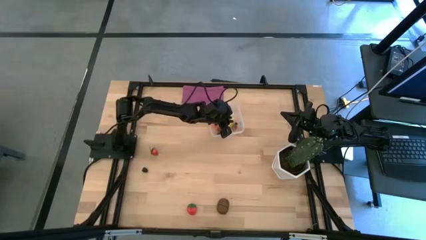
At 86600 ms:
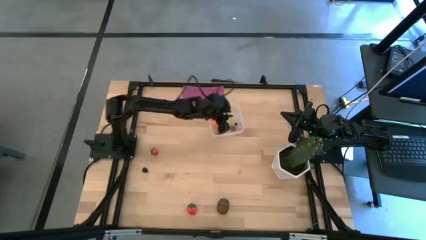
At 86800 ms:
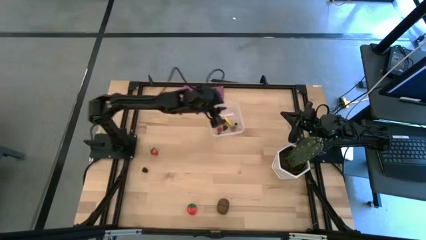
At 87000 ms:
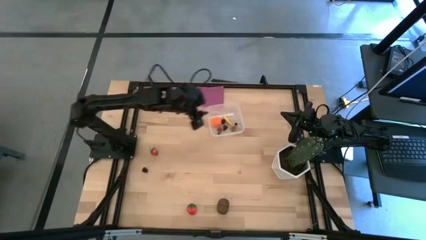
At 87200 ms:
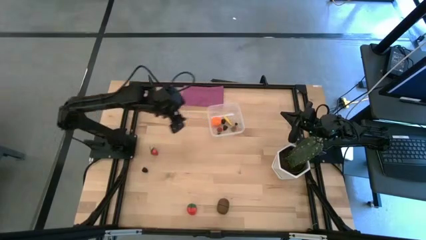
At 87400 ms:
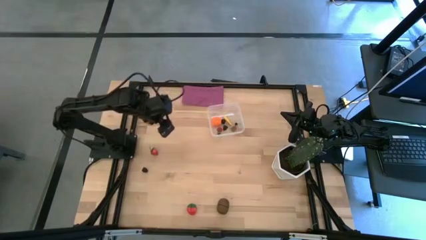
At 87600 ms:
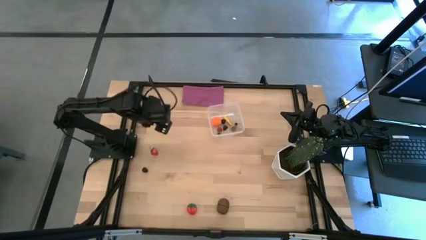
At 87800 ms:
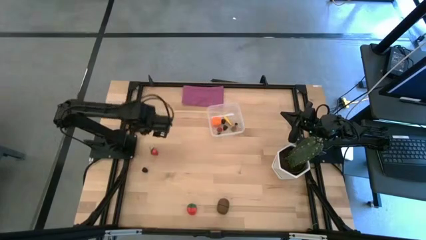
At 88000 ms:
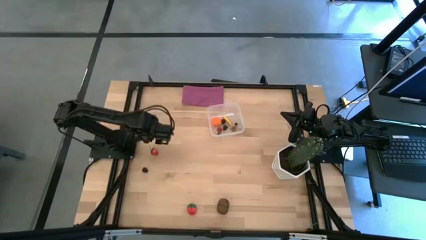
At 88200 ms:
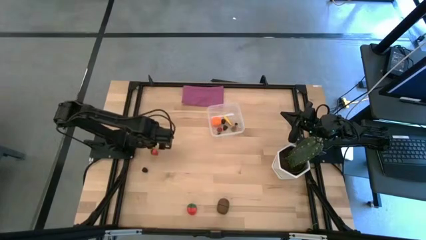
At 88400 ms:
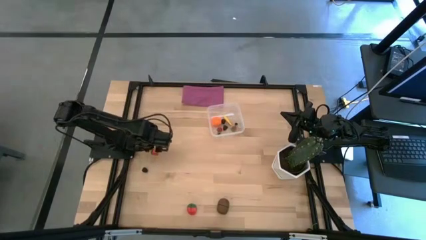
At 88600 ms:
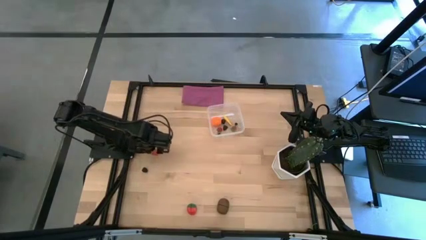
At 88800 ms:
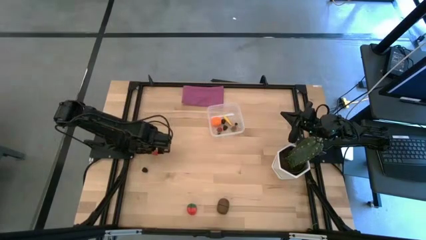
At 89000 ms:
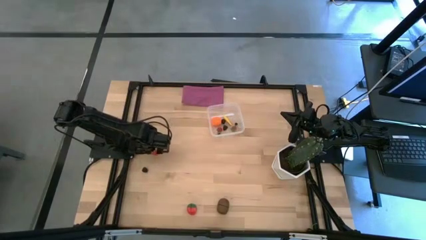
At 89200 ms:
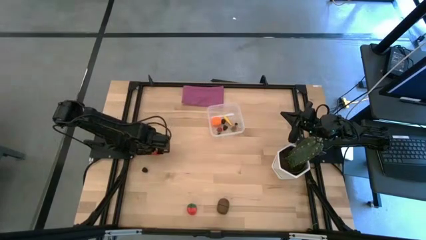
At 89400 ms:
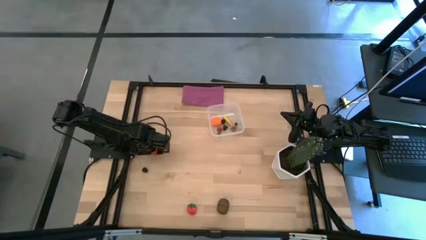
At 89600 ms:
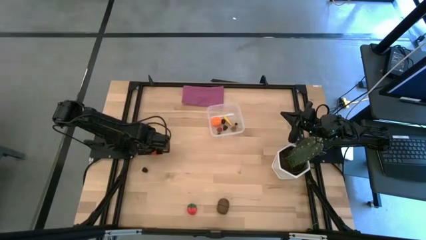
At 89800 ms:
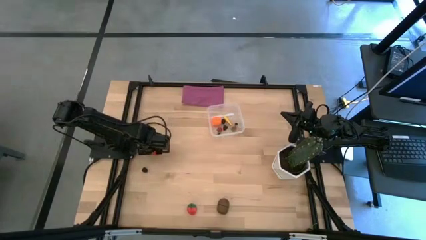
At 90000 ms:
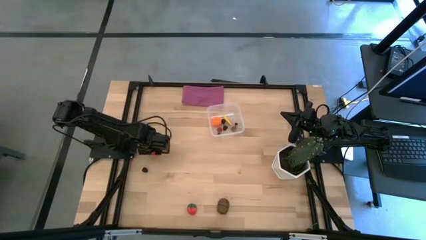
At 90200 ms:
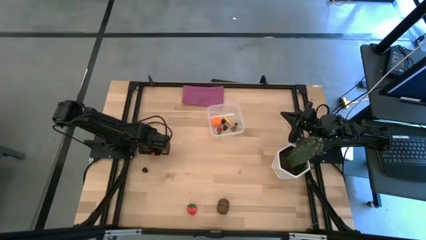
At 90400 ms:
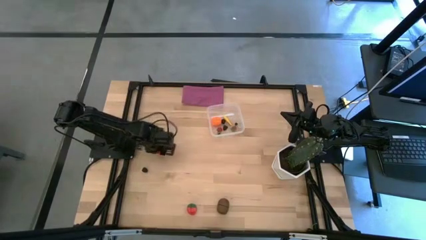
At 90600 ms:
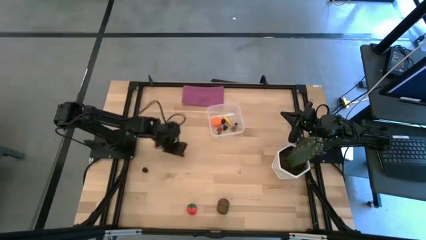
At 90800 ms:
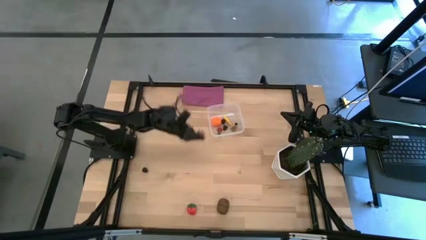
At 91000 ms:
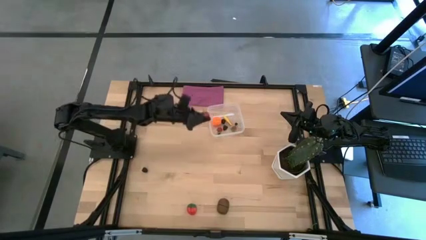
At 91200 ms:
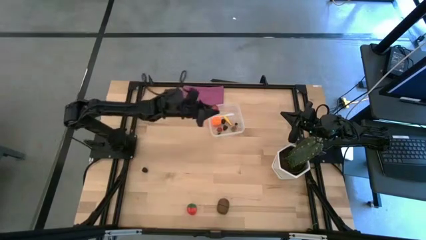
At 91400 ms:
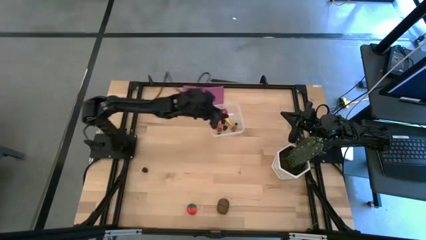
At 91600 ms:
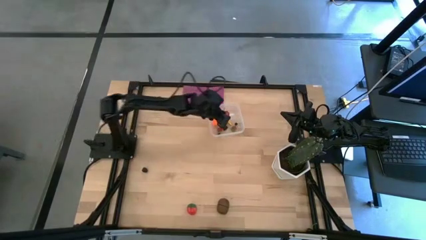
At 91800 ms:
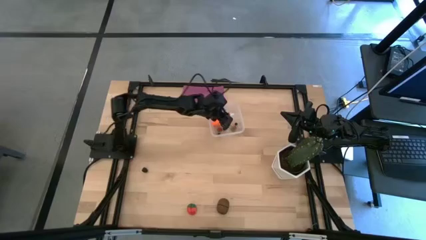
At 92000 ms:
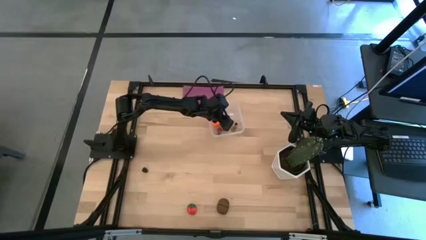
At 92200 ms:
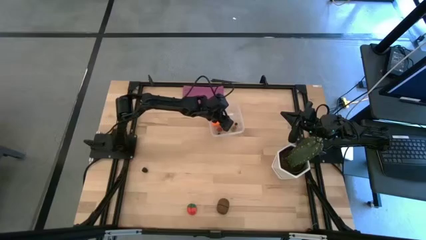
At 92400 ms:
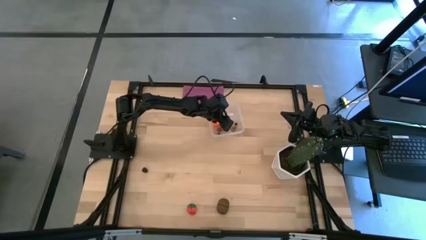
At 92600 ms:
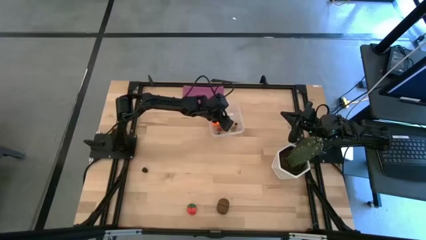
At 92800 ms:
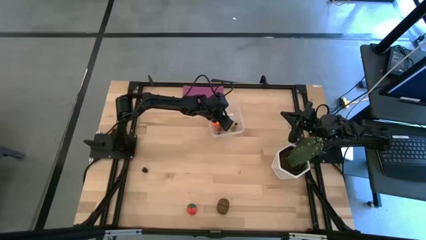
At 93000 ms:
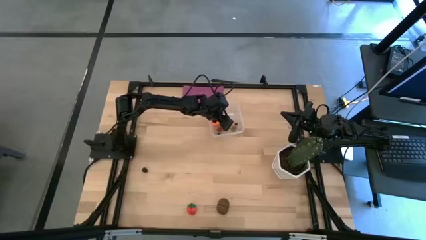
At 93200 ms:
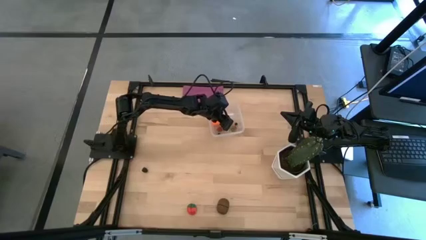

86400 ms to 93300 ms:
Task: Pick and placing Produce into tupperware
Put the top red strawberry into the transparent bin

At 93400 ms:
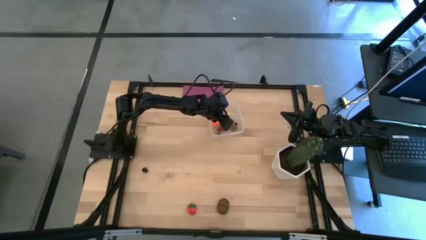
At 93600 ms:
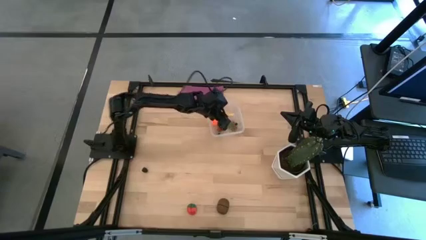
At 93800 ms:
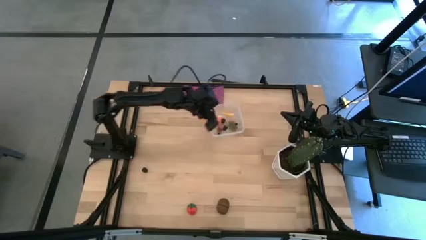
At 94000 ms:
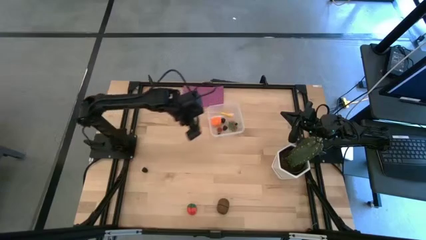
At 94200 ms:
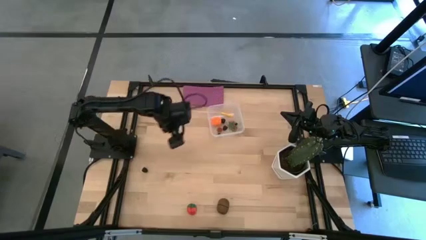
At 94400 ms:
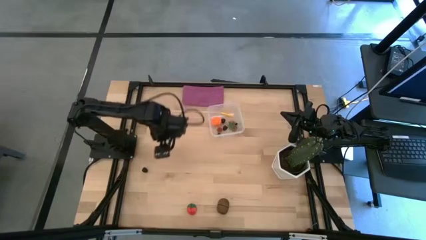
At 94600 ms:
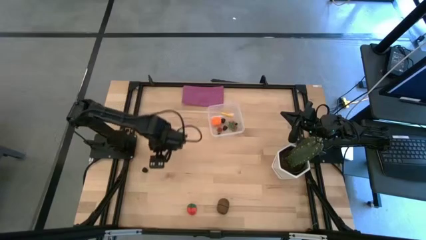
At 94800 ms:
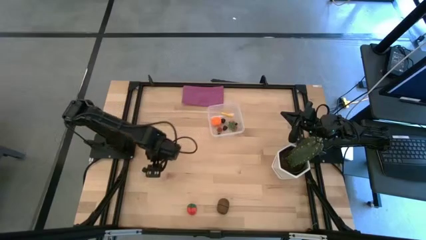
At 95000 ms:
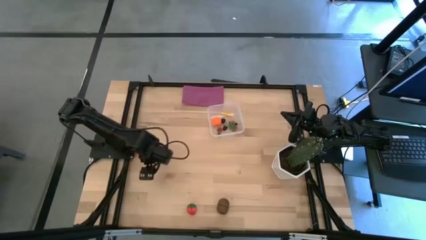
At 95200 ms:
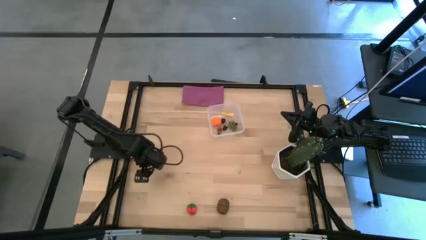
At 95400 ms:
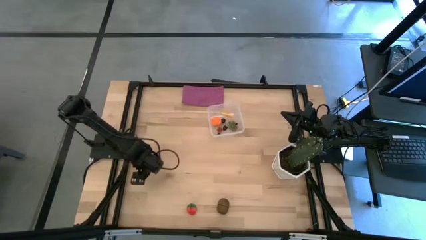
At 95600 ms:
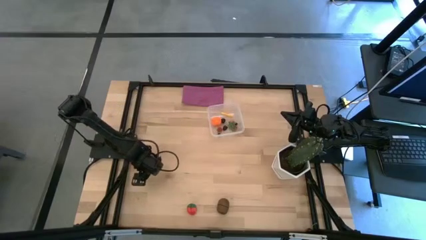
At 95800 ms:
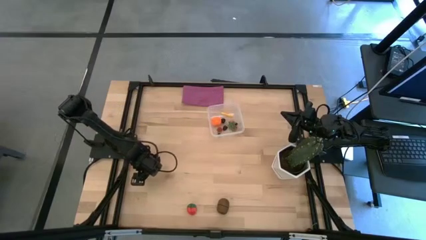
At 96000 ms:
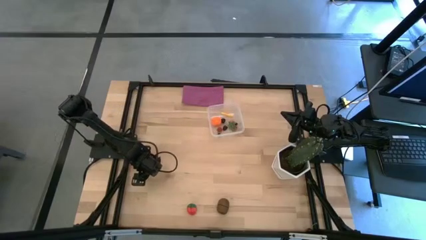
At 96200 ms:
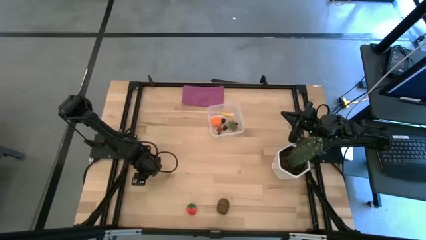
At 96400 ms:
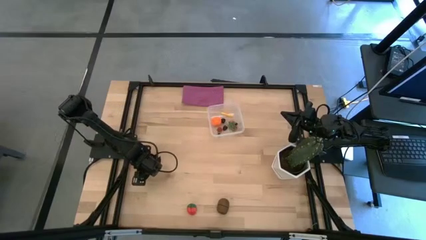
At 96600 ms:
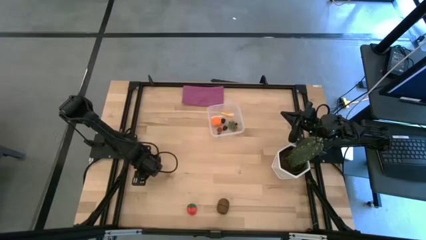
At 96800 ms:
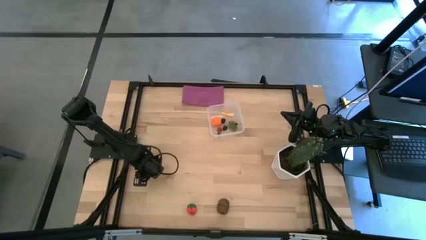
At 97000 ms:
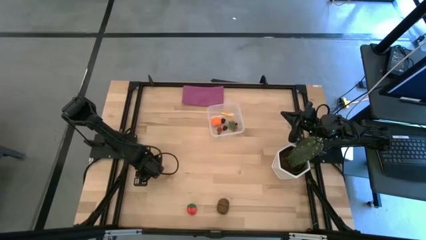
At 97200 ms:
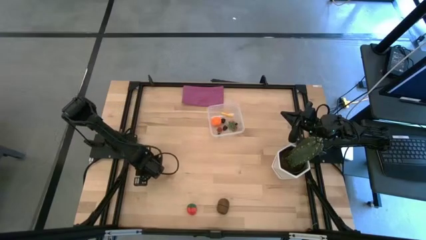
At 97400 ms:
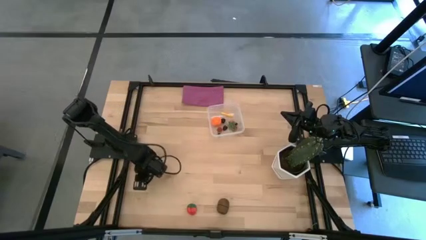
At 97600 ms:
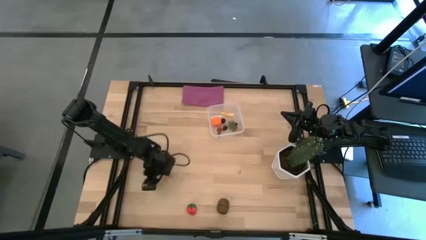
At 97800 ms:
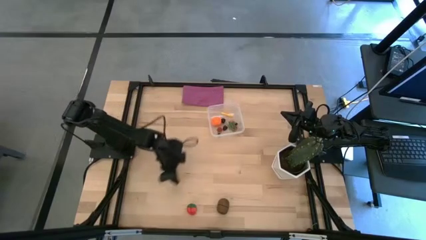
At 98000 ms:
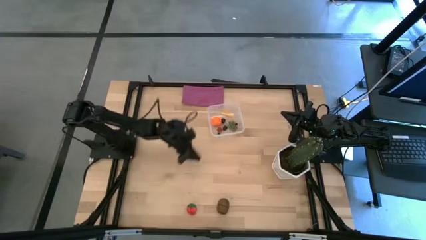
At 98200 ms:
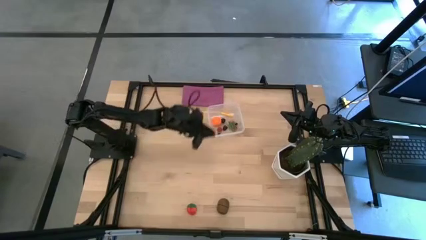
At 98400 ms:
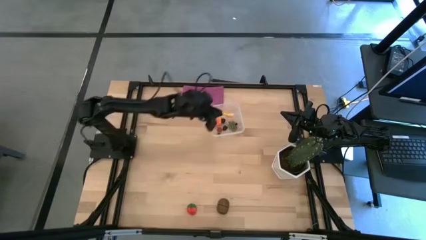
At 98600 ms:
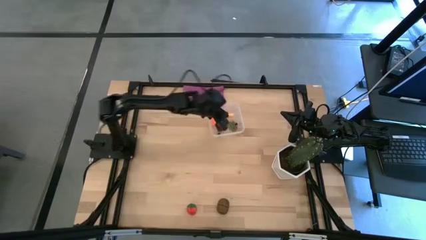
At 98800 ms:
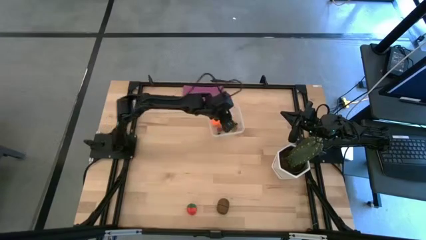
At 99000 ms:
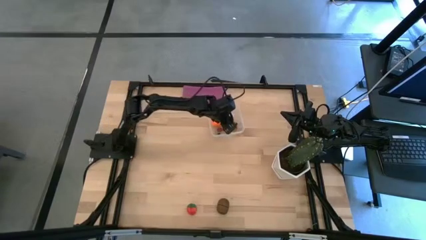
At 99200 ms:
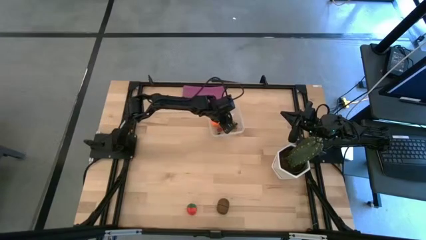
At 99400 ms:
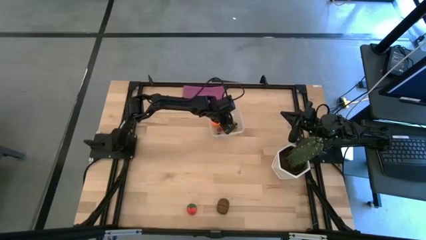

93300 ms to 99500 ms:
Put the blackberry into the transparent bin
